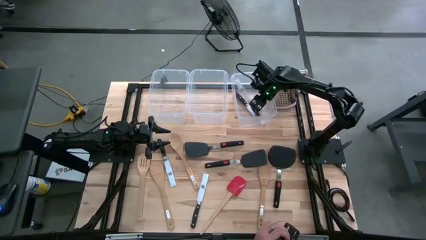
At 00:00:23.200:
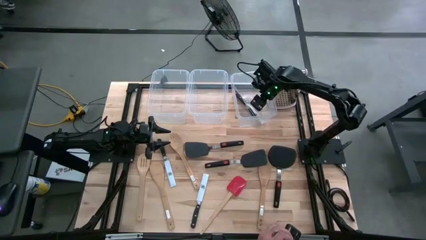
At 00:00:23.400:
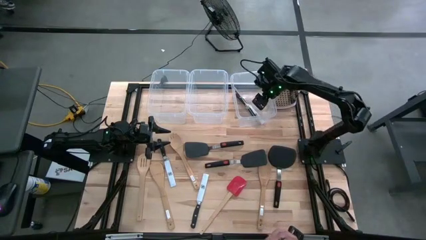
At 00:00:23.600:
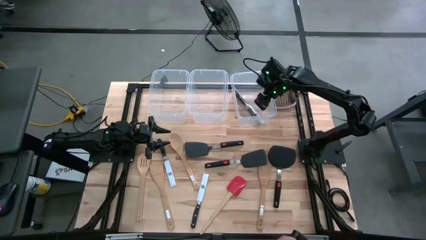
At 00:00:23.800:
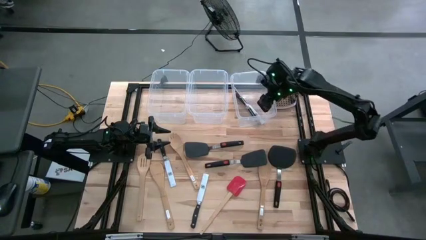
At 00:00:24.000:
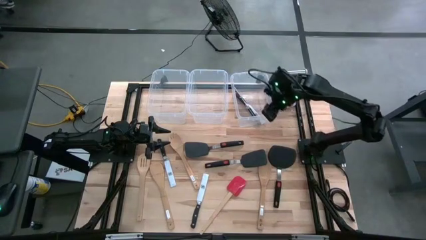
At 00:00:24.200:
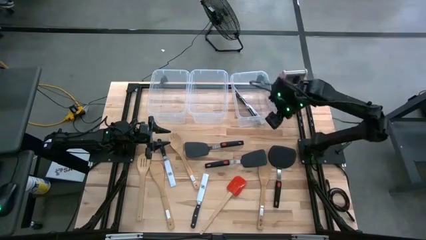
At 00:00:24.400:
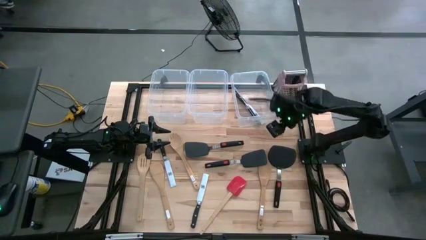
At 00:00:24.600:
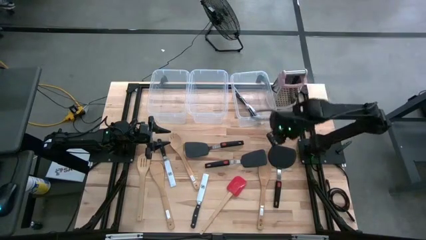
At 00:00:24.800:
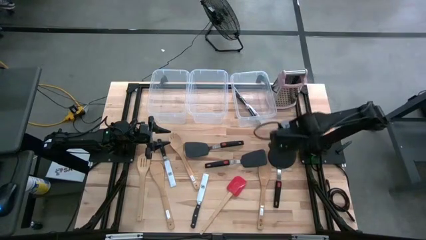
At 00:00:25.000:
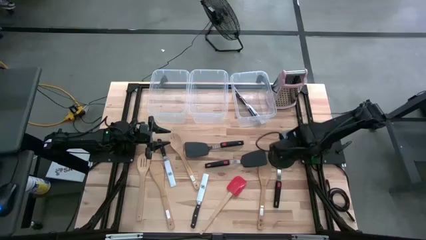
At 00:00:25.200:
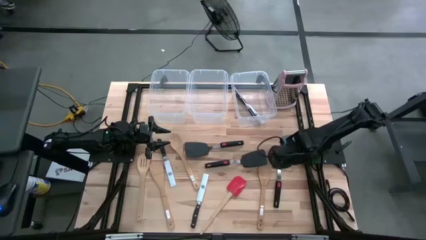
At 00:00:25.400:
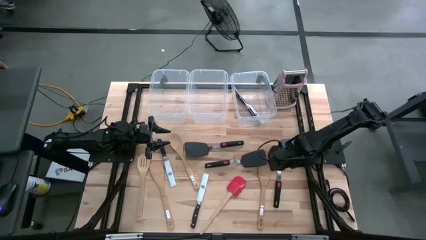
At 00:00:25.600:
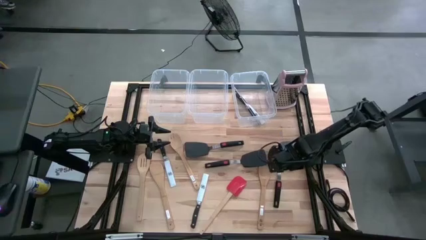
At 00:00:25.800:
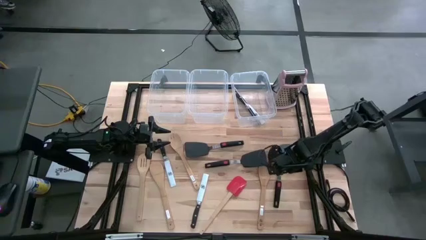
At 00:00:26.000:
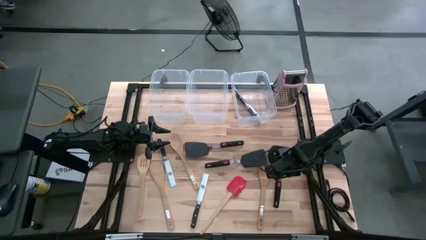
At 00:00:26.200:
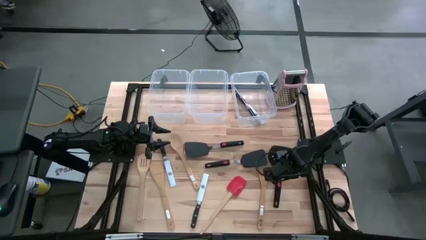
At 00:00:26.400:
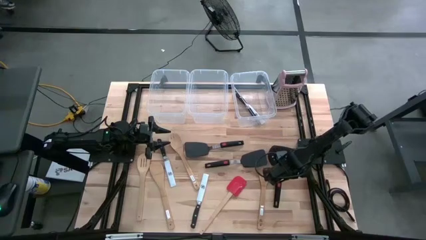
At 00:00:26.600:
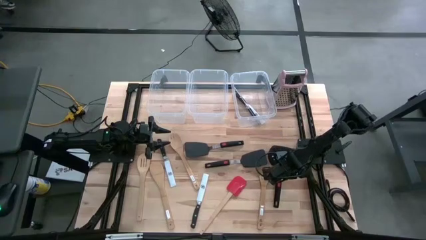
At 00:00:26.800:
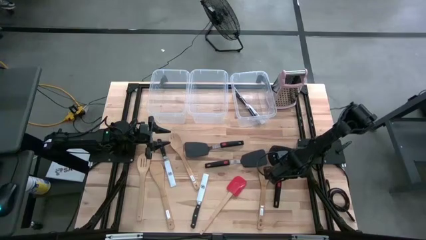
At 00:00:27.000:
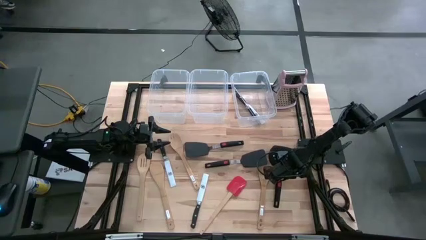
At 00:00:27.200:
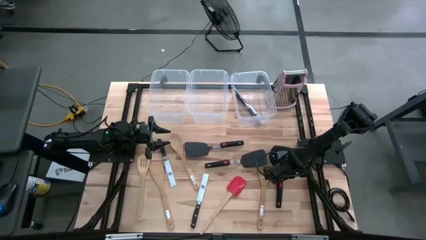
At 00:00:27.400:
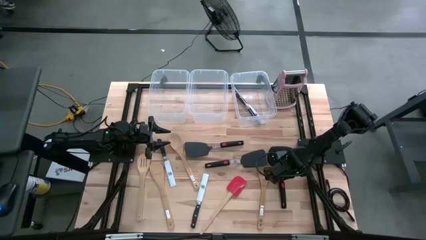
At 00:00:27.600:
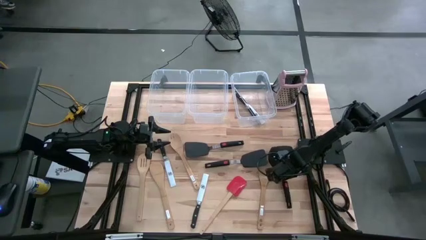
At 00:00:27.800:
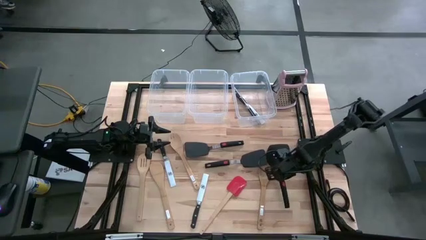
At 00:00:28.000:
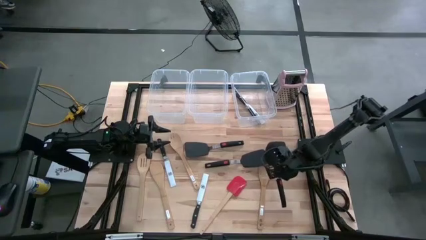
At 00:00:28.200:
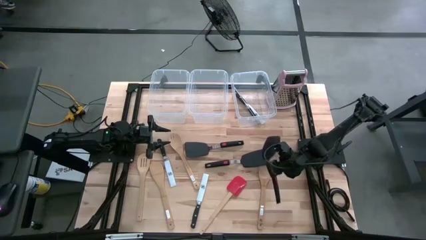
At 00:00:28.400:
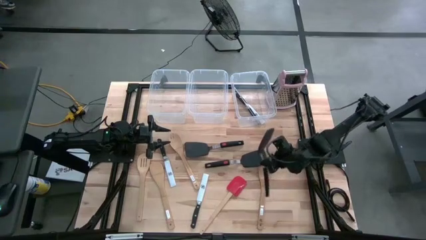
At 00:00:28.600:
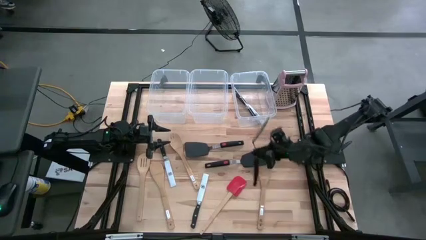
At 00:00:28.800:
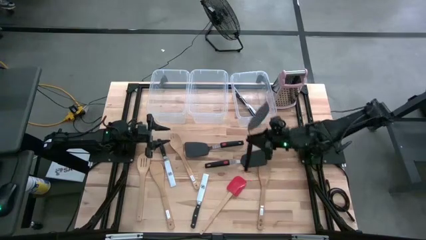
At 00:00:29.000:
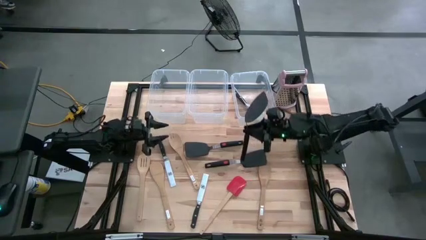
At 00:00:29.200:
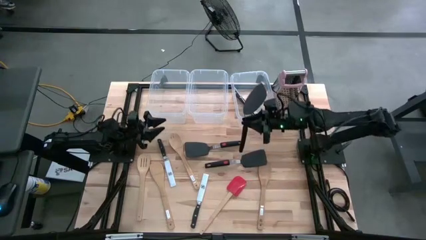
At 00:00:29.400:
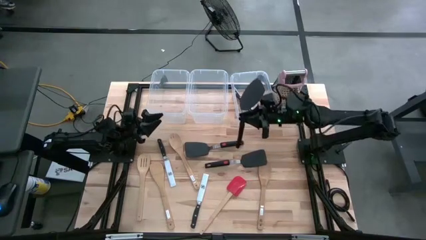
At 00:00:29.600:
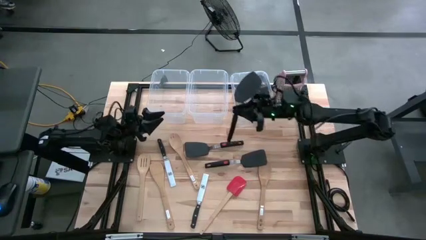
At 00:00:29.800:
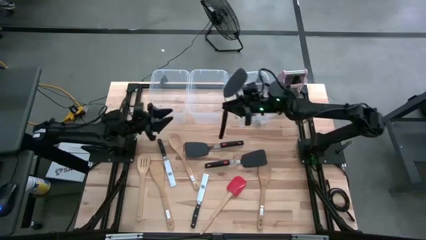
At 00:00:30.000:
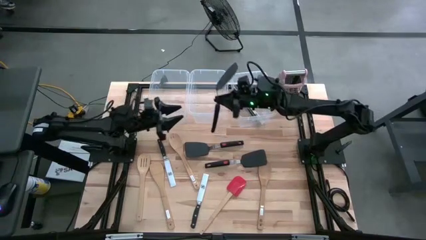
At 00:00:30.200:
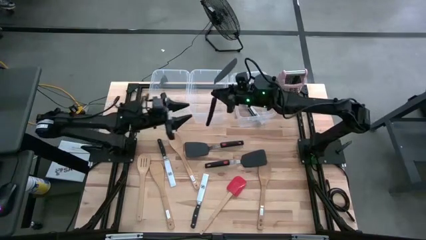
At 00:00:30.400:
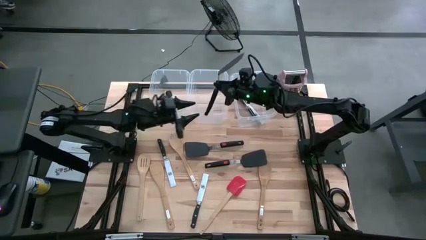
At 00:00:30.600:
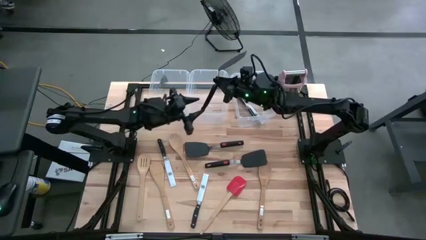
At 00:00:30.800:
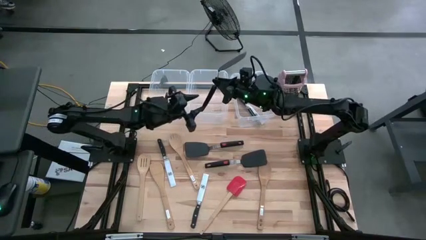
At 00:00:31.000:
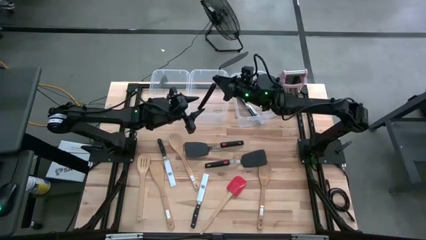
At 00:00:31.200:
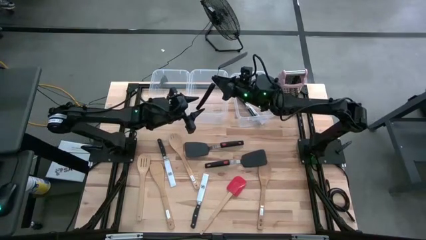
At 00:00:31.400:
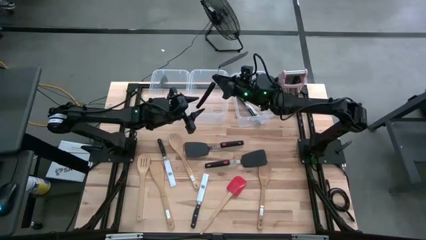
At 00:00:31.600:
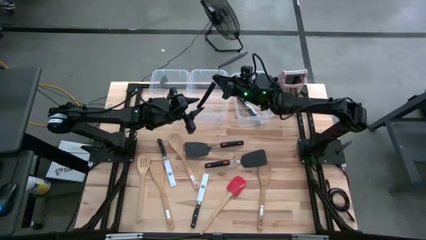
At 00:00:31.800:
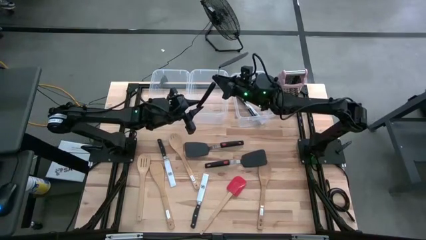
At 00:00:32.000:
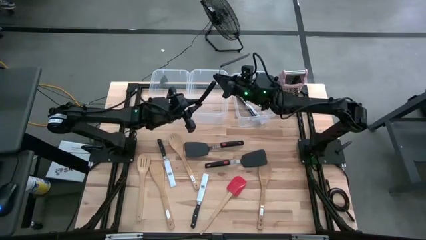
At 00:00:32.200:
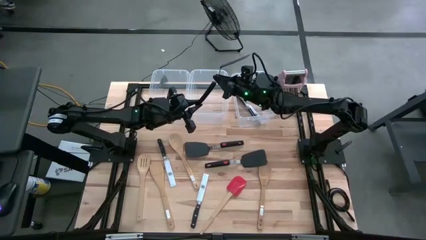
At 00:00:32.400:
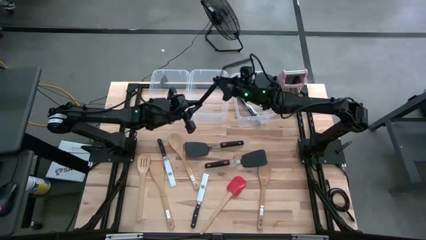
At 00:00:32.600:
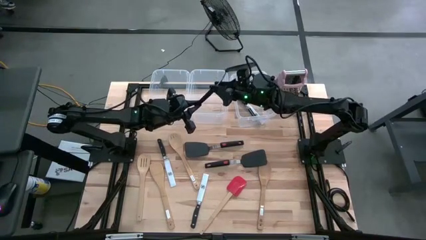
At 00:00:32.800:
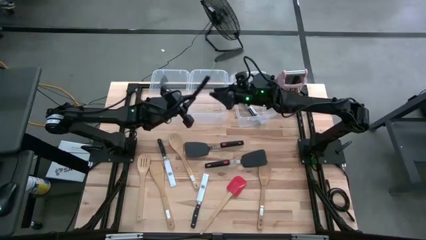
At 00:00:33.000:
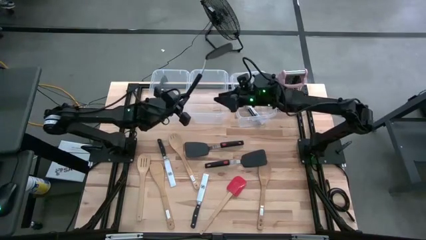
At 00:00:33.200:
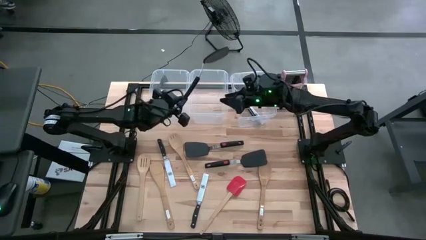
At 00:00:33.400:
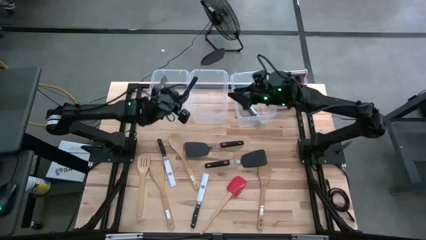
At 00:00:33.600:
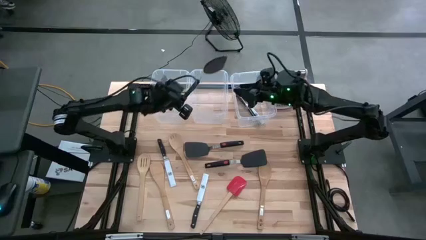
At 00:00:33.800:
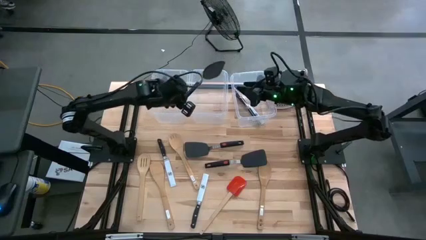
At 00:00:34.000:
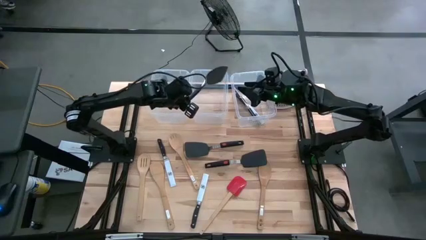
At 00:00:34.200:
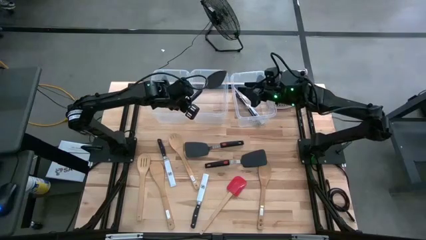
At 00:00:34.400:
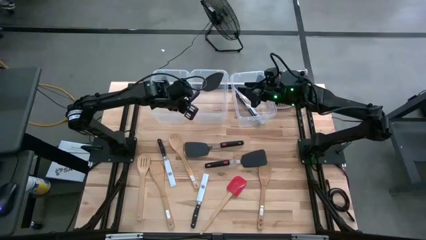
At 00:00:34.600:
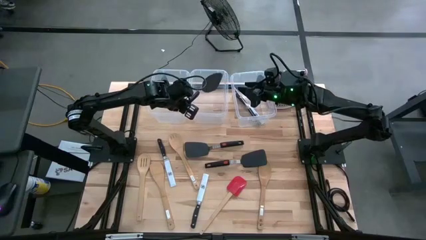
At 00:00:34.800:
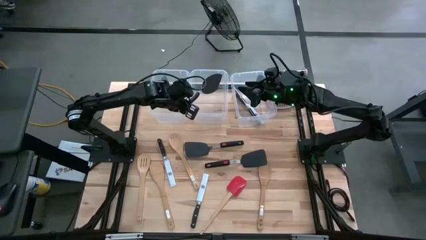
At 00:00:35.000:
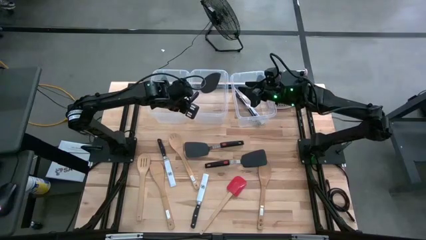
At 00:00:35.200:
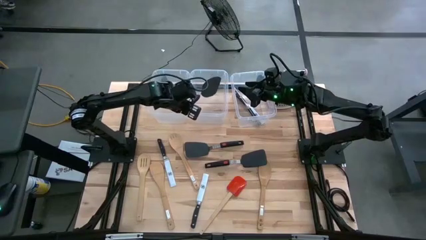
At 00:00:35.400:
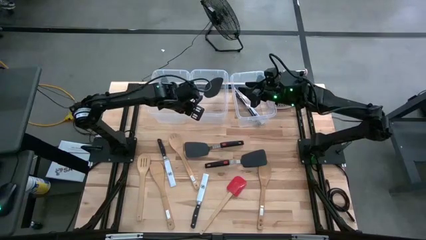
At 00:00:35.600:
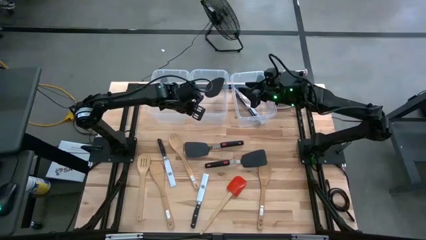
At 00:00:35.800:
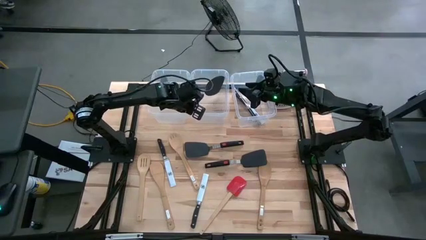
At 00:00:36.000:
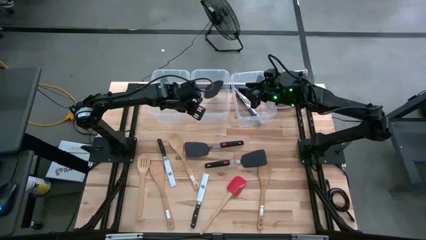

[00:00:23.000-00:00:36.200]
Task: Pick & Place Kitchen Items
Put the black spatula into the transparent middle bin
